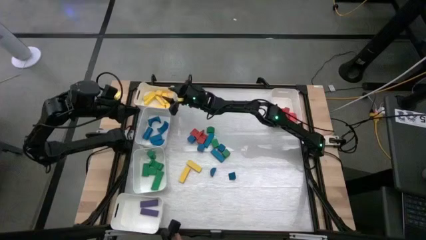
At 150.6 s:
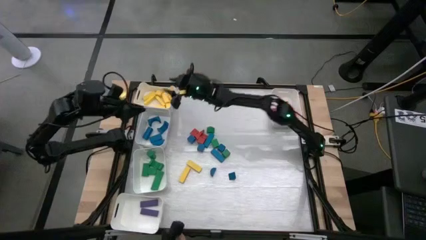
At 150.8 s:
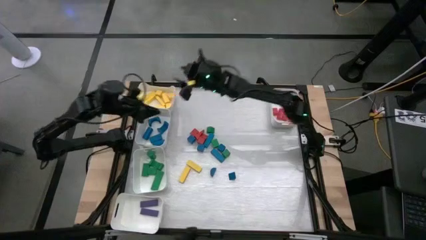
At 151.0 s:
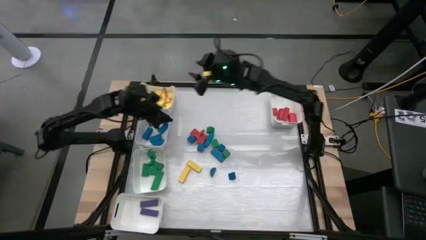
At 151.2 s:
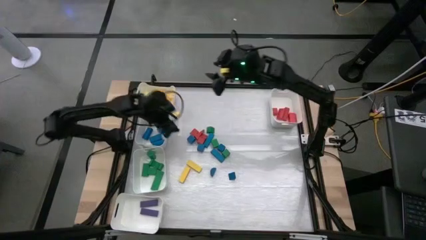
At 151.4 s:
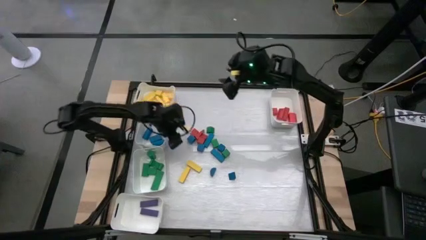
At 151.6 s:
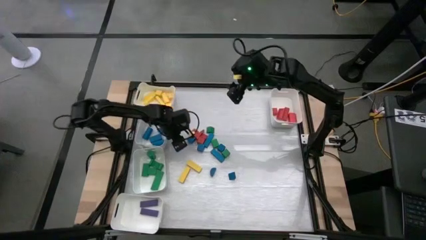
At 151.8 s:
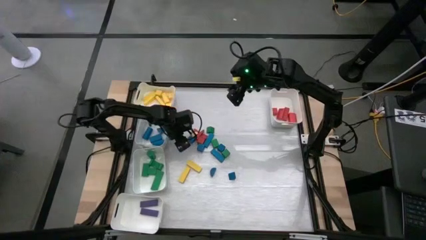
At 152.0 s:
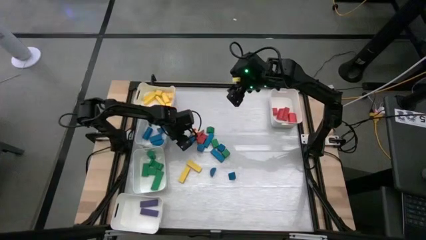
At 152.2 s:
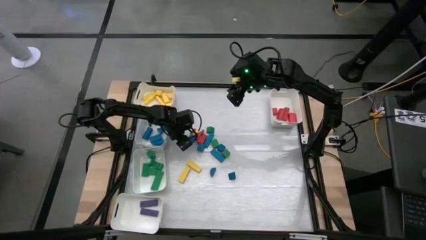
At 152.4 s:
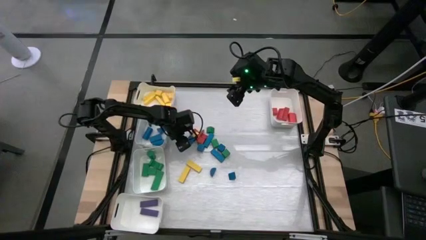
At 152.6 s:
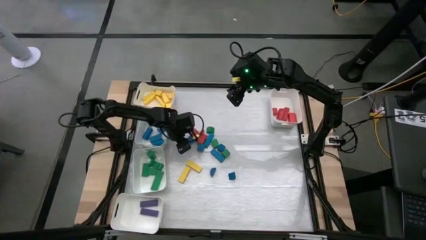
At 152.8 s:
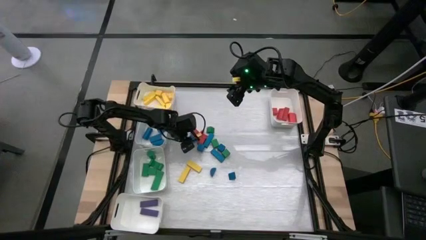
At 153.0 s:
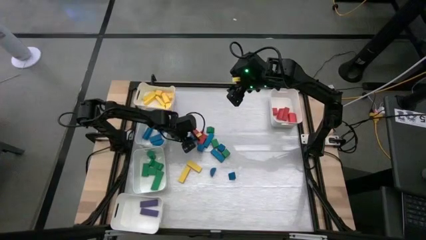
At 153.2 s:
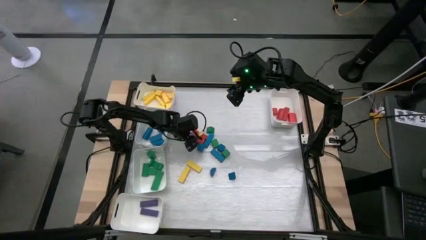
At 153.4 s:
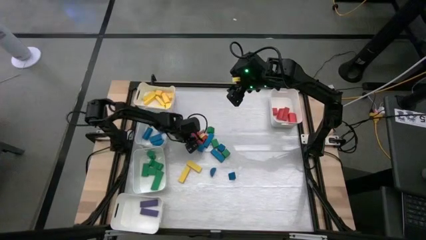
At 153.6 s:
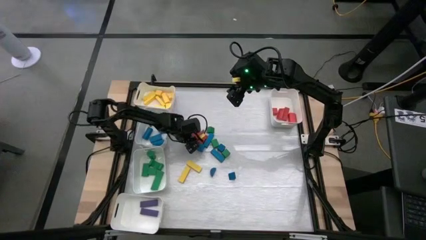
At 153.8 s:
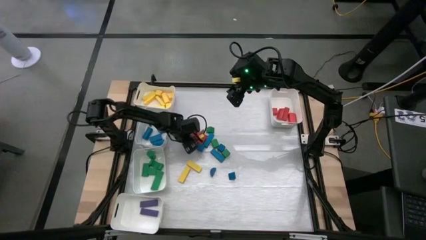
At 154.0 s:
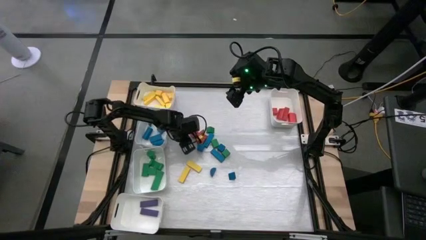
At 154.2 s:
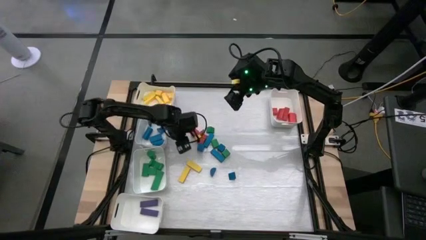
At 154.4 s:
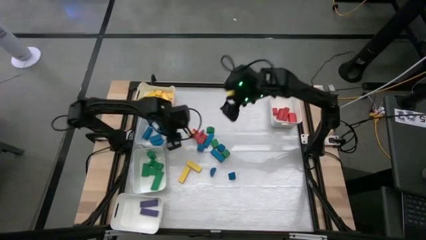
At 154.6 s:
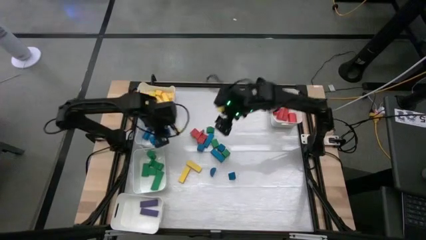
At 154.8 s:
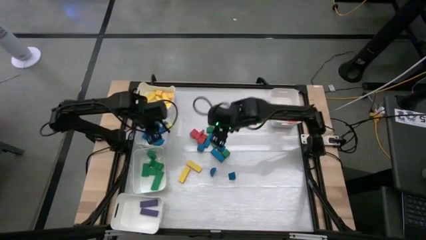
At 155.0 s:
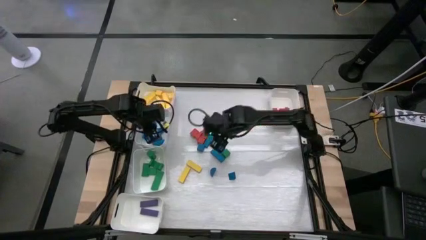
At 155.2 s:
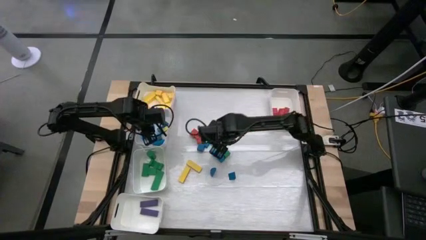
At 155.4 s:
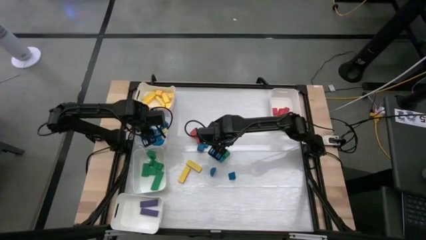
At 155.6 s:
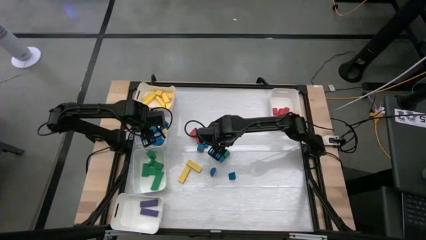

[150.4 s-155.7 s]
Task: Sort blocks
Put the blue wooden block into the top middle left white bin

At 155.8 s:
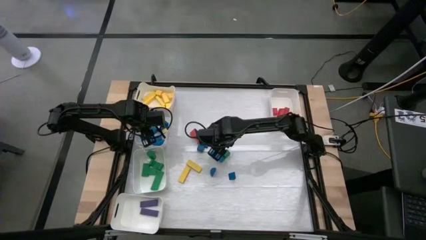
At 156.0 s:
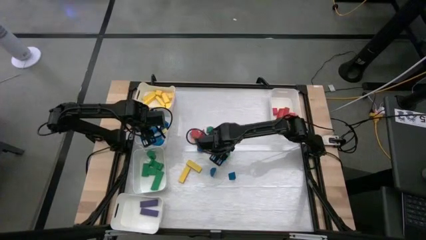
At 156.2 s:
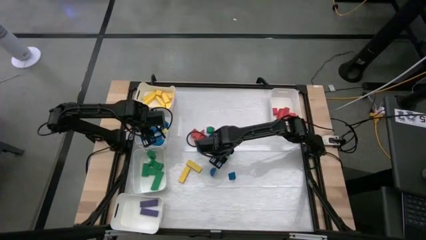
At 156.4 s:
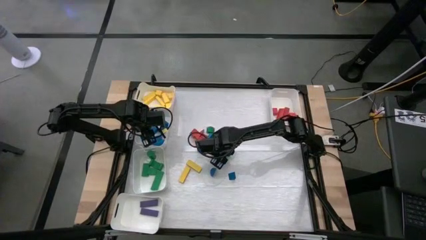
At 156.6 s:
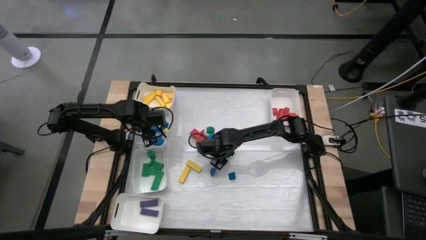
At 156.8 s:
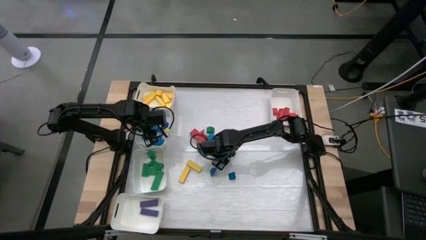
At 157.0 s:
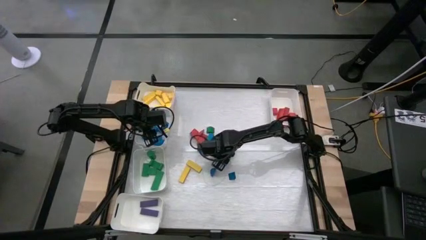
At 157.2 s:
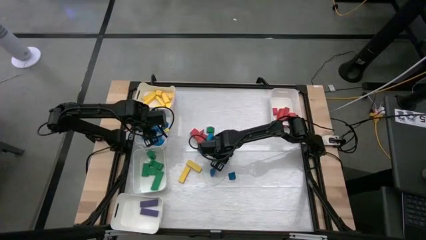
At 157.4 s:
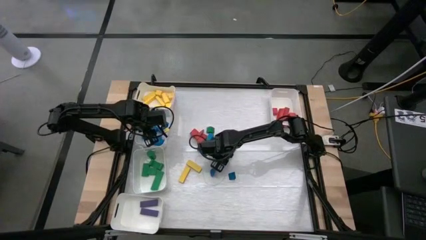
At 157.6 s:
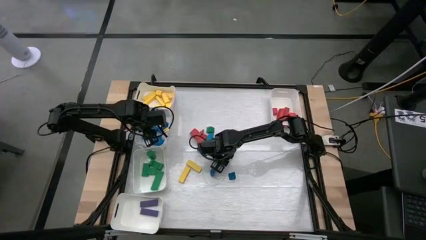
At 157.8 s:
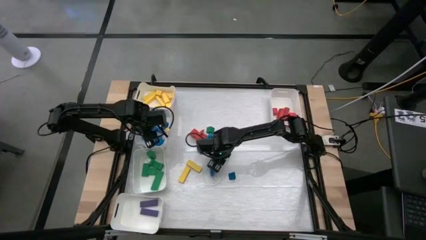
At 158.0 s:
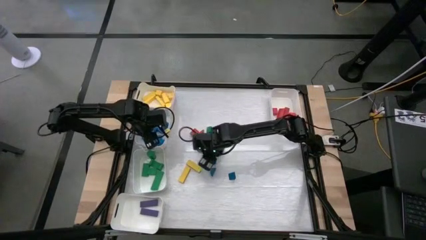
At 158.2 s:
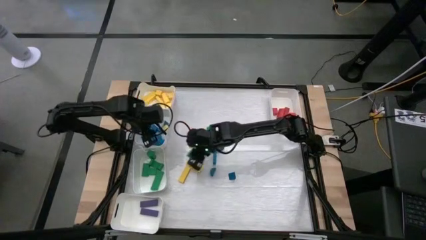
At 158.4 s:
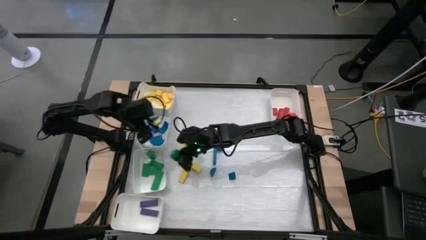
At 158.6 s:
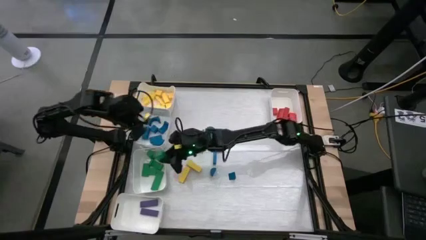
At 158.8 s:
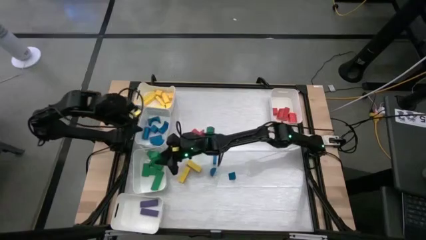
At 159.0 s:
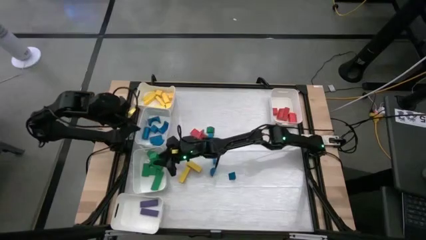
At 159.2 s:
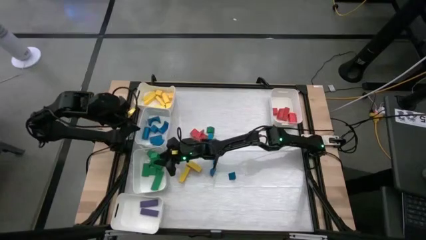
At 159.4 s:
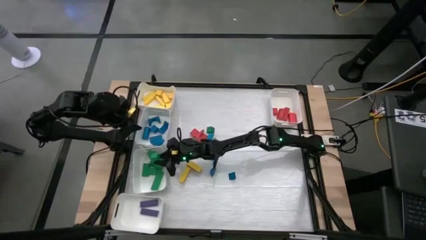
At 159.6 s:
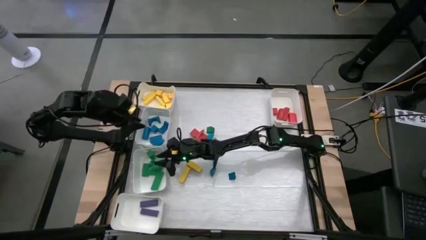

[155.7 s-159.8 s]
Put the green wooden block into the bottom middle left white bin

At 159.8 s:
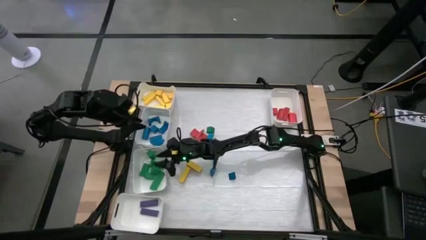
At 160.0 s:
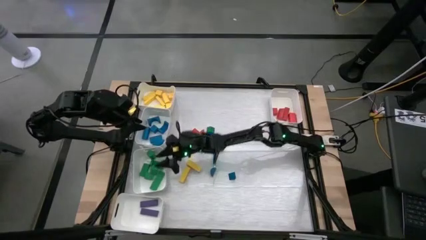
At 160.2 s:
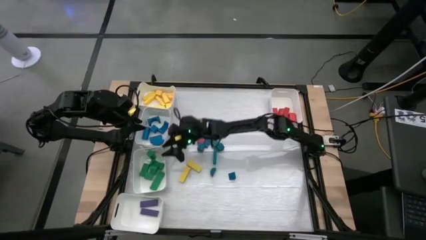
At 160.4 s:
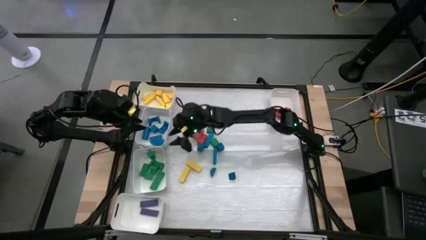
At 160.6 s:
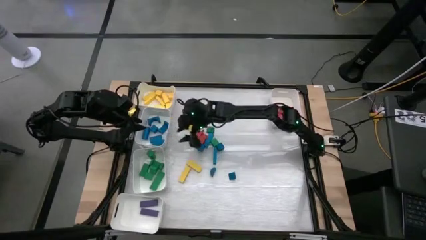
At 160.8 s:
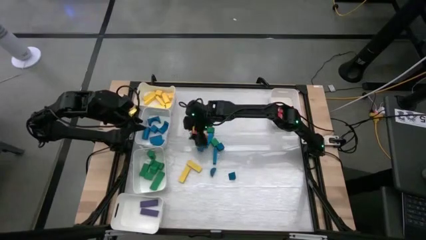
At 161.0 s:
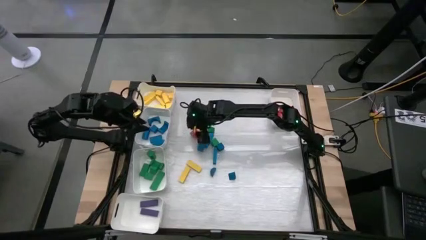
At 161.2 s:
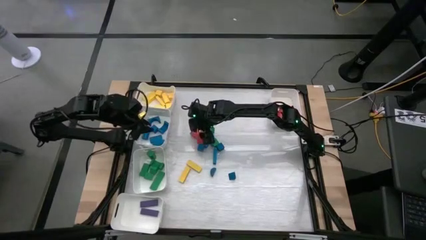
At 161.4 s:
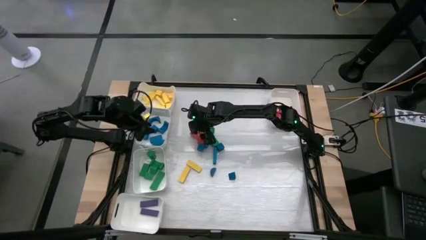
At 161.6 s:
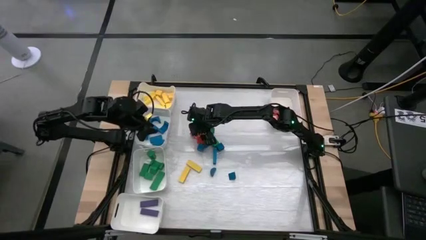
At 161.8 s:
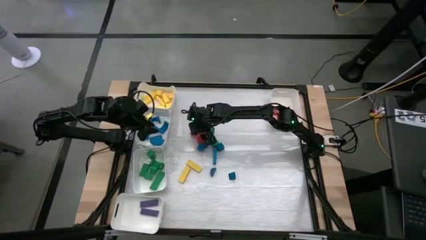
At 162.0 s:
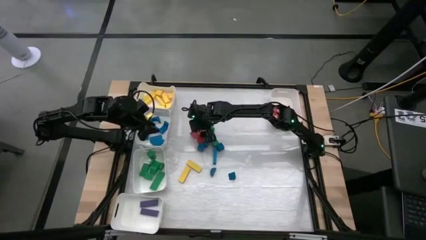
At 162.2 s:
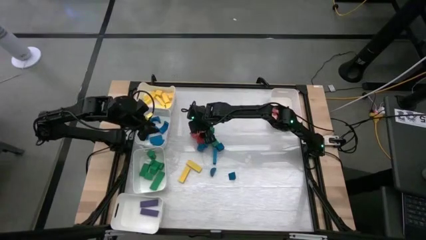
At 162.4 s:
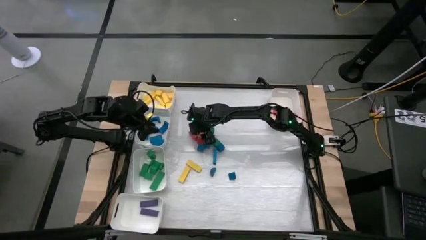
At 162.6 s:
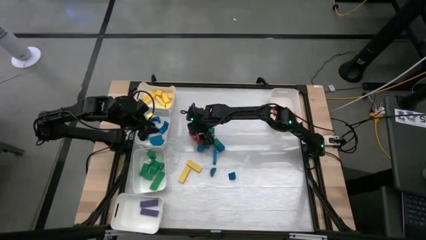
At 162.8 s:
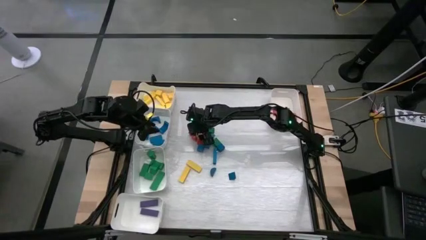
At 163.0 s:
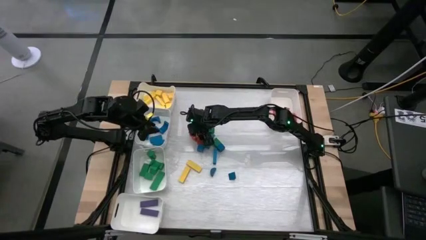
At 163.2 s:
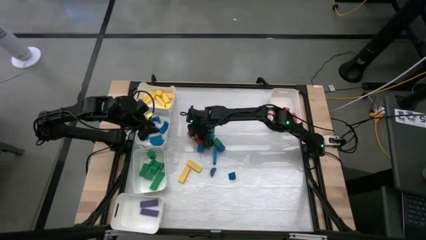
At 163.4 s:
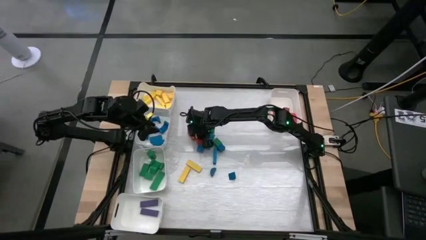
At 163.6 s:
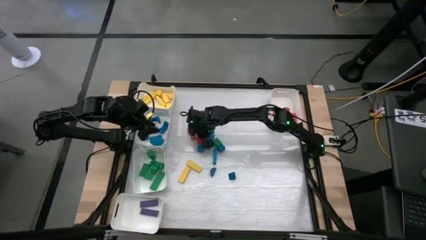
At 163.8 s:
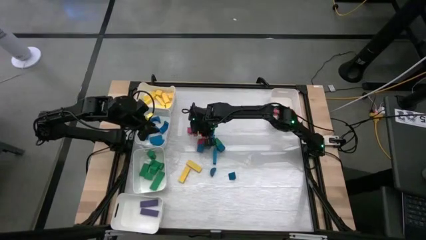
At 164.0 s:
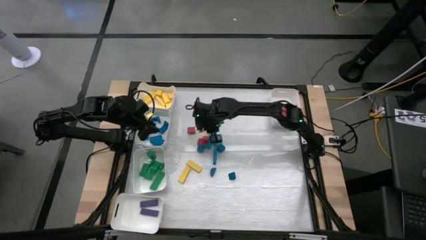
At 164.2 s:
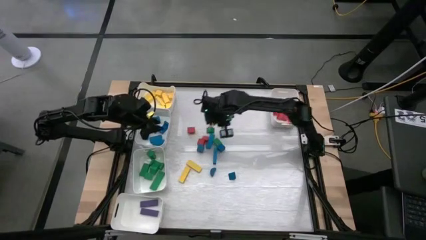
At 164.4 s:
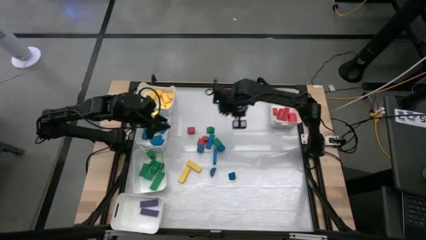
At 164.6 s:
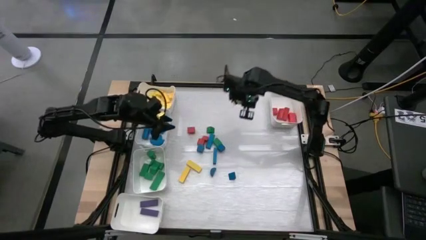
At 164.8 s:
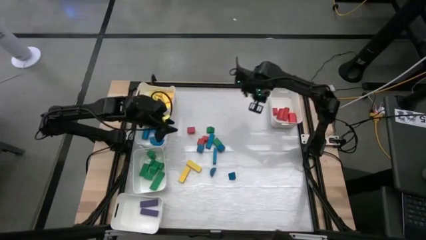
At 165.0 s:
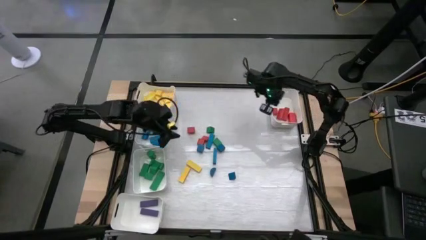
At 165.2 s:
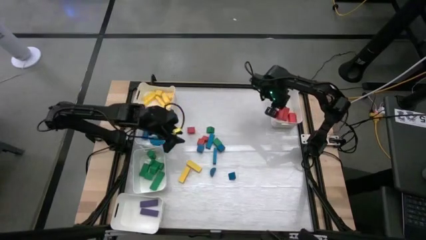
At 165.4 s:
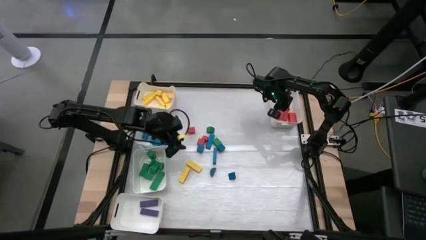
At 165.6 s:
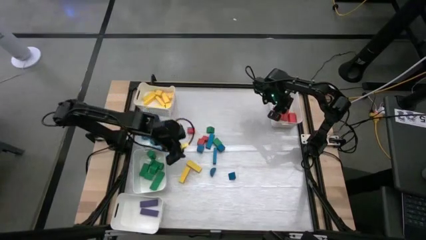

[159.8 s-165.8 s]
Put the red wooden block into the top right white bin

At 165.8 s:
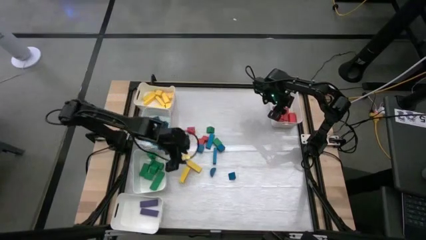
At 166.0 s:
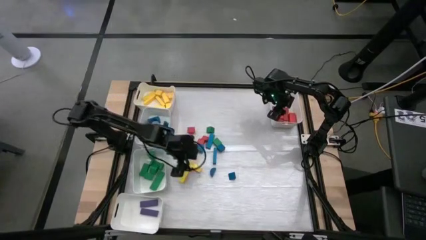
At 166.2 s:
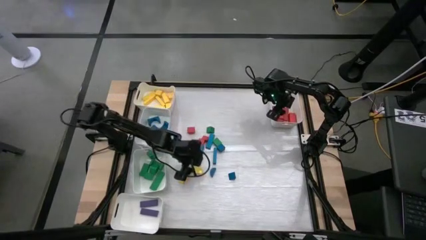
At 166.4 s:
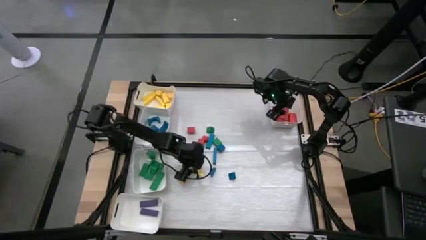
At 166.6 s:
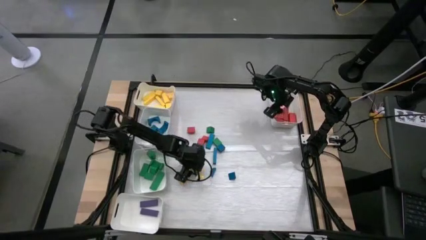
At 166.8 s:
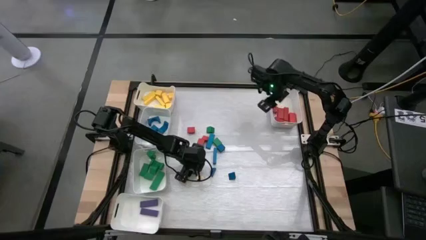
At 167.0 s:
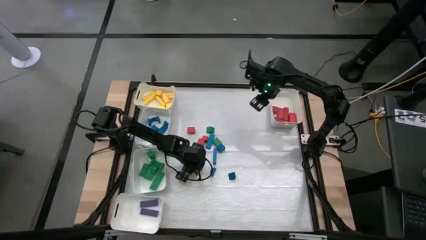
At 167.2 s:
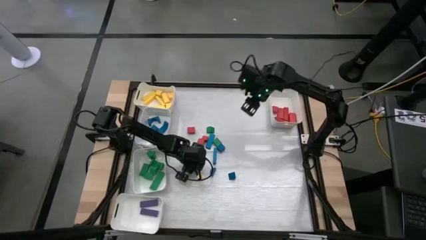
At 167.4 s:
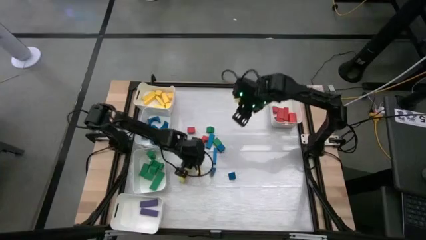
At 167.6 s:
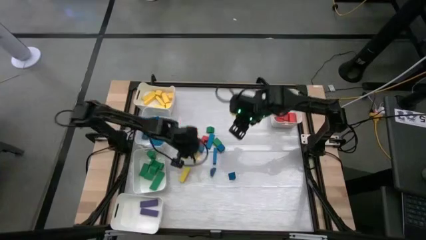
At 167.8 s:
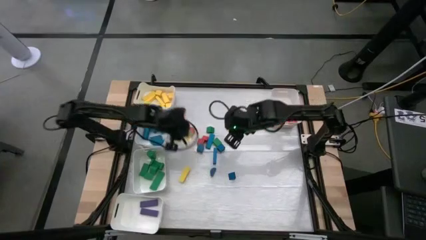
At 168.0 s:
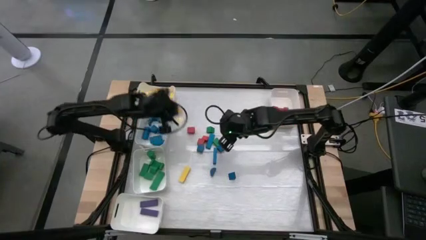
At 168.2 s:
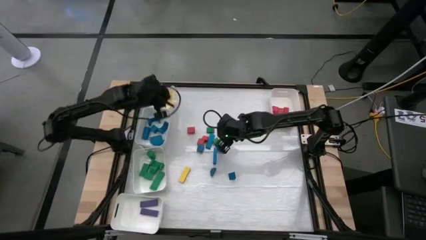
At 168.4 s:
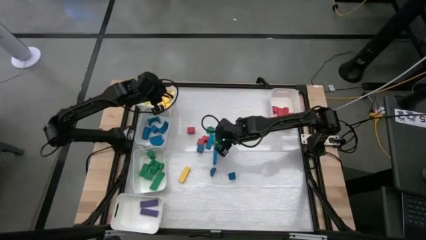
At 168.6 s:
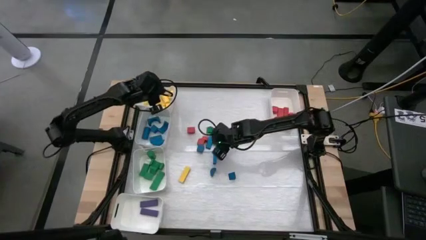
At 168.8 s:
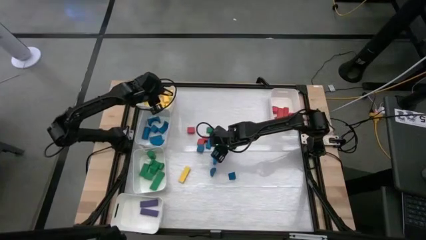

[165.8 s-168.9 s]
Put the yellow wooden block into the top left white bin
